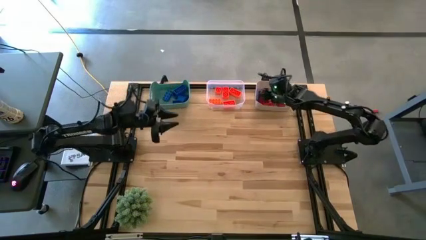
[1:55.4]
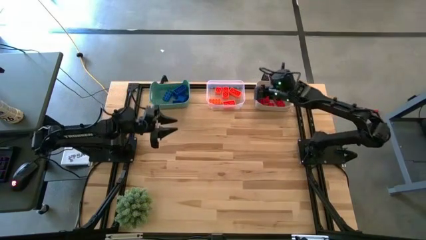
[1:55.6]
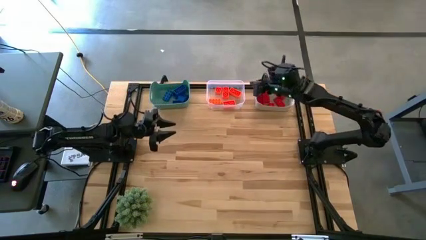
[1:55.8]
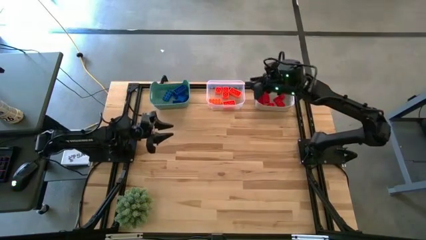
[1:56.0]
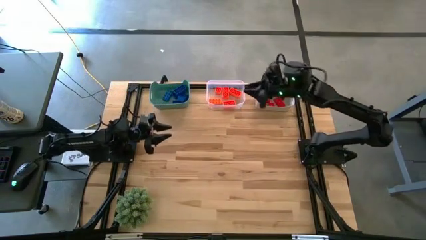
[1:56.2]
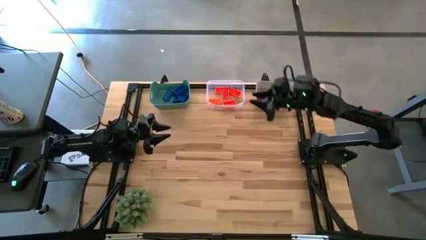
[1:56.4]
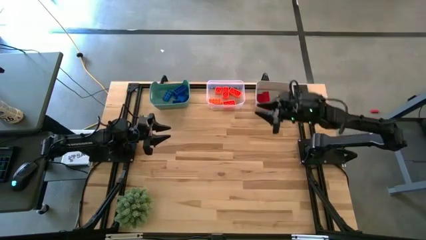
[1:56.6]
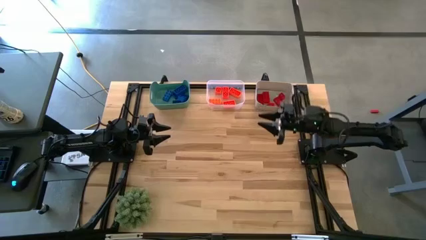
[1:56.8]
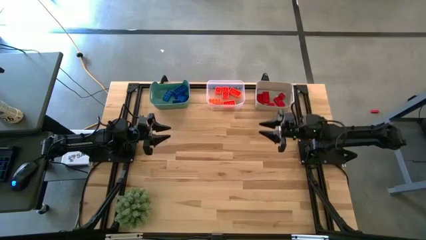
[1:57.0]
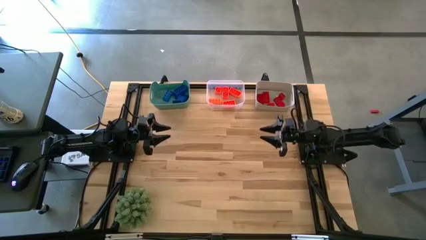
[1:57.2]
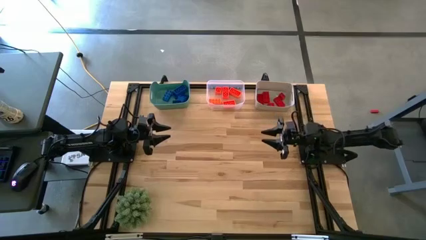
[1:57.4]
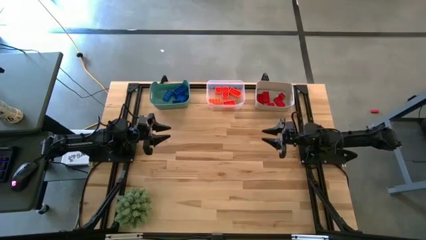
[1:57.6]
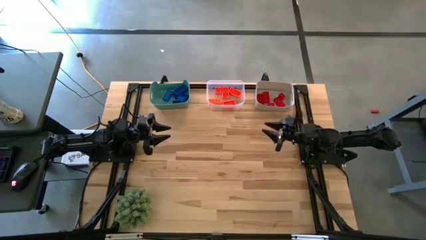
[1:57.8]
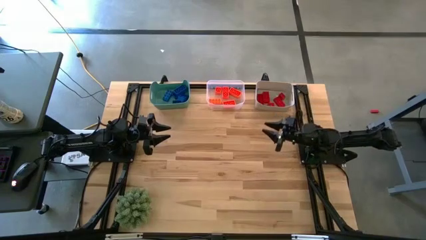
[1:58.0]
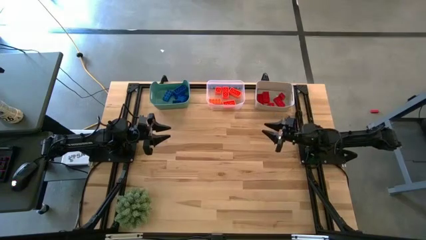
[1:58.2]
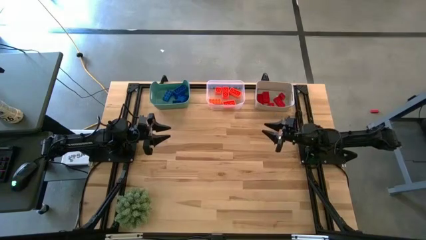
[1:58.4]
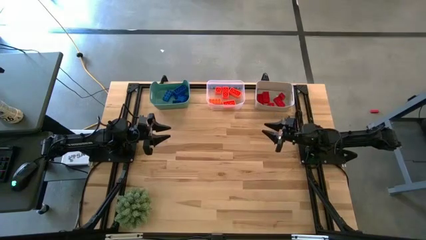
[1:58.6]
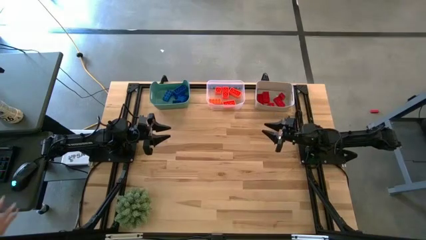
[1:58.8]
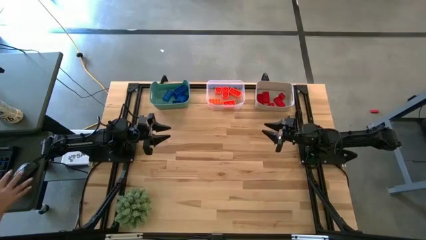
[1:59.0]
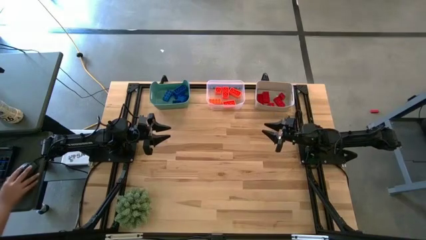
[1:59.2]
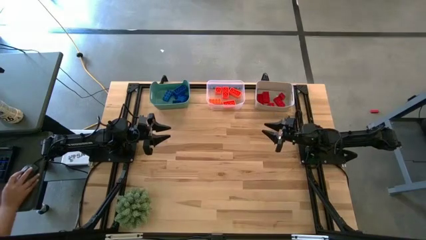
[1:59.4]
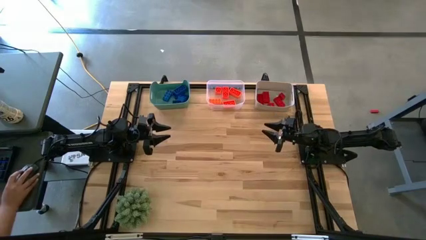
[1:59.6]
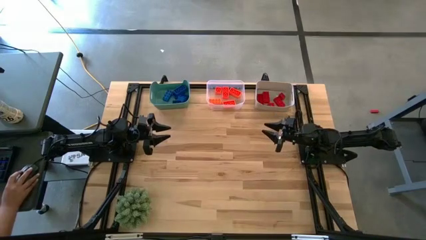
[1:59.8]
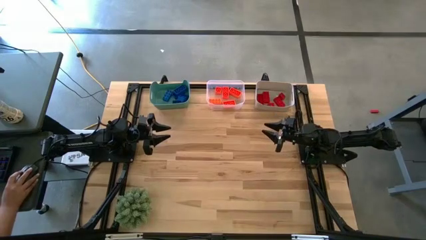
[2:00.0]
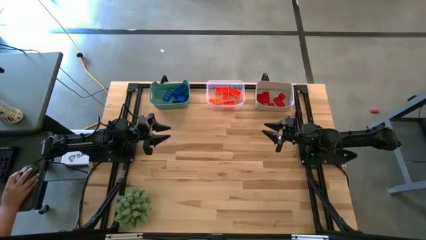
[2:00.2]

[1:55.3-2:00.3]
Task: Sort & place blocks by color
Return to Home Position

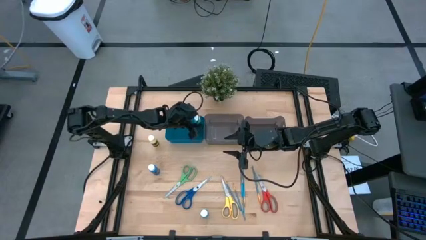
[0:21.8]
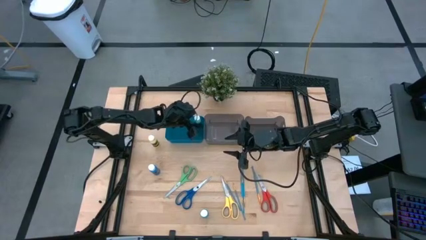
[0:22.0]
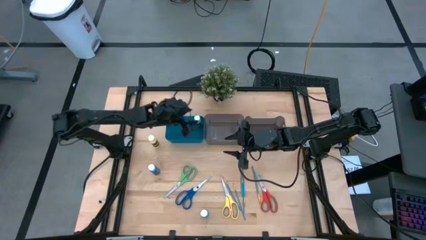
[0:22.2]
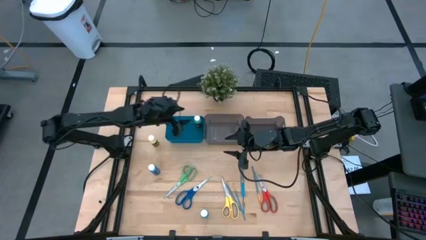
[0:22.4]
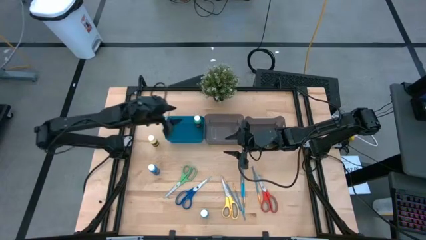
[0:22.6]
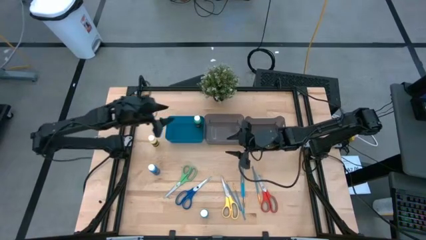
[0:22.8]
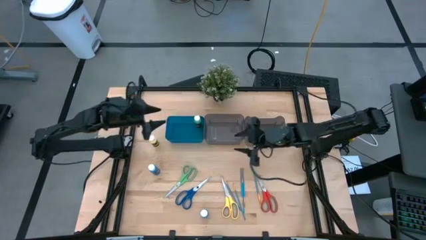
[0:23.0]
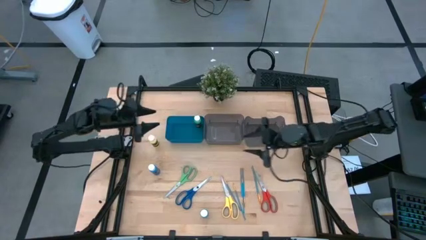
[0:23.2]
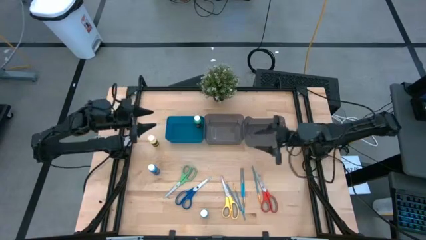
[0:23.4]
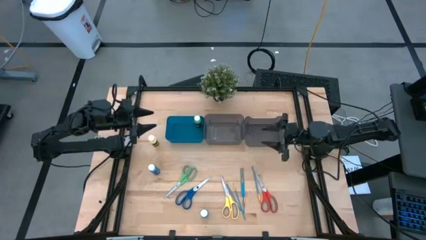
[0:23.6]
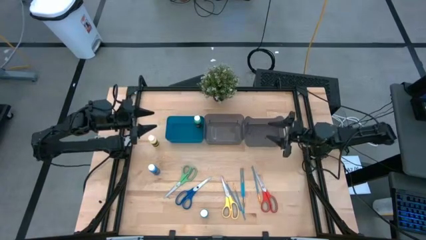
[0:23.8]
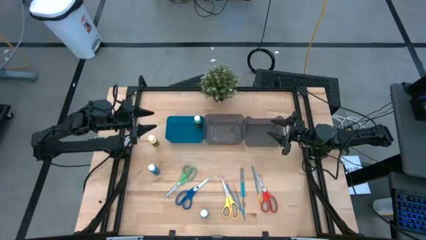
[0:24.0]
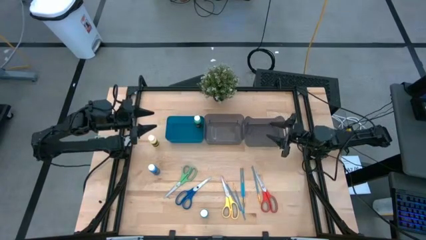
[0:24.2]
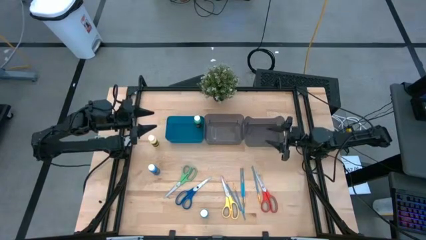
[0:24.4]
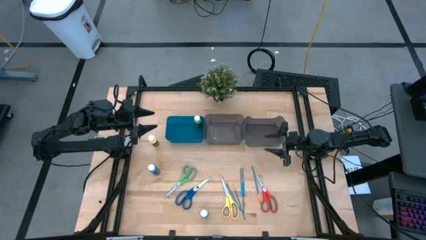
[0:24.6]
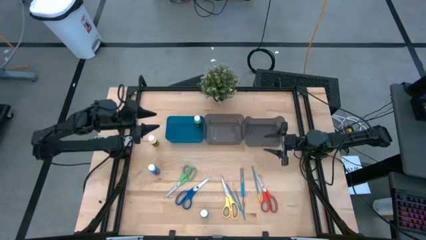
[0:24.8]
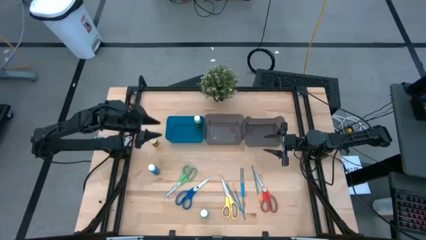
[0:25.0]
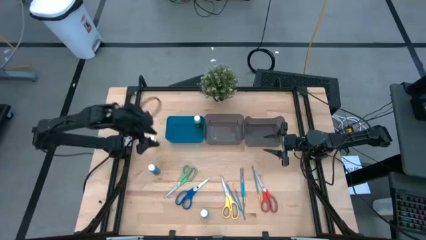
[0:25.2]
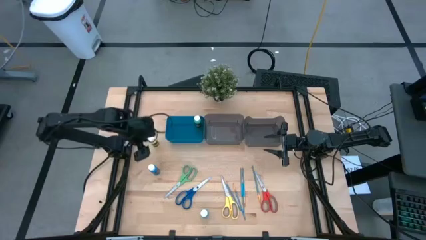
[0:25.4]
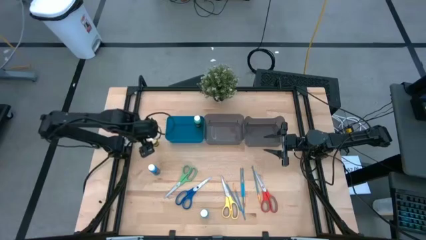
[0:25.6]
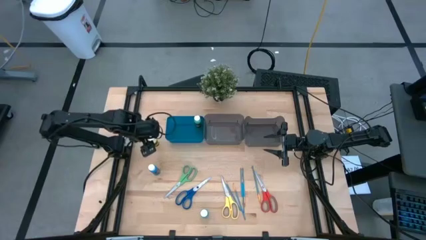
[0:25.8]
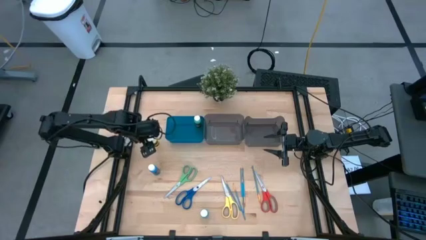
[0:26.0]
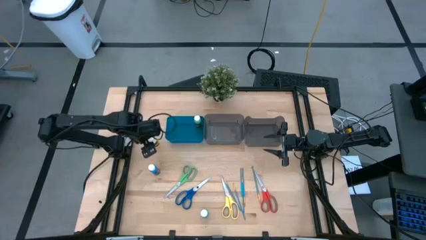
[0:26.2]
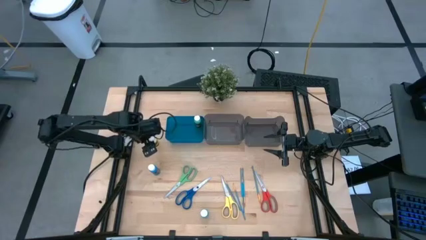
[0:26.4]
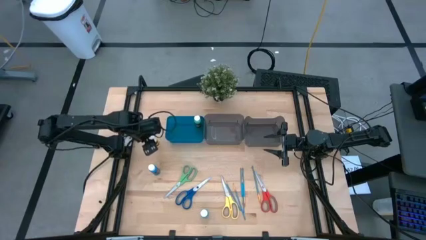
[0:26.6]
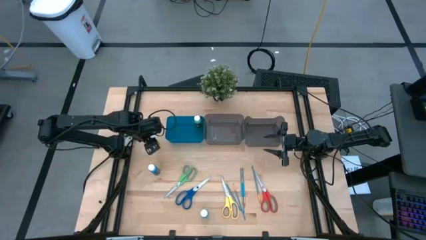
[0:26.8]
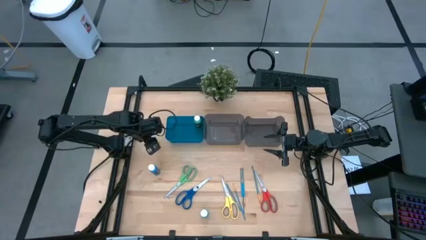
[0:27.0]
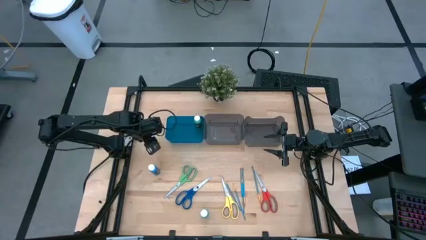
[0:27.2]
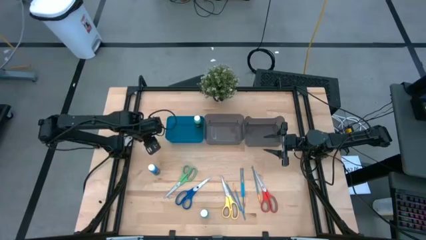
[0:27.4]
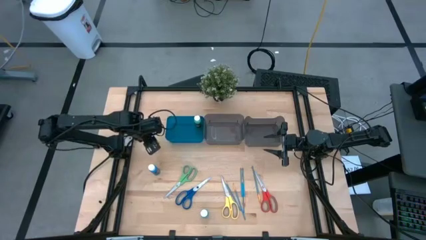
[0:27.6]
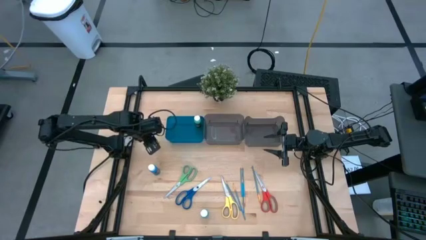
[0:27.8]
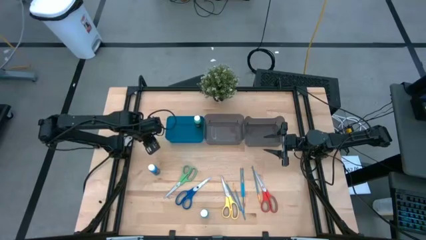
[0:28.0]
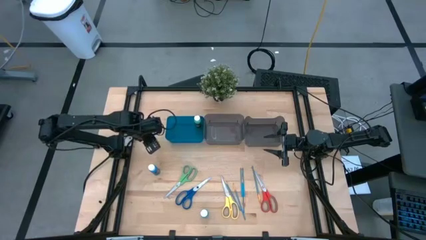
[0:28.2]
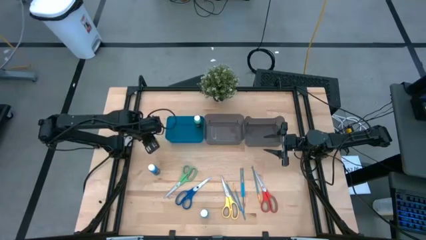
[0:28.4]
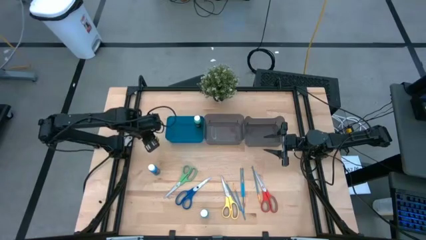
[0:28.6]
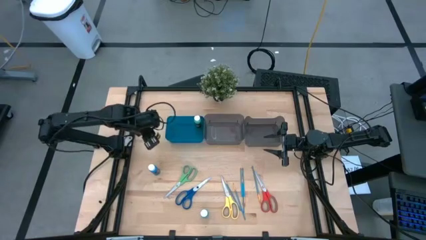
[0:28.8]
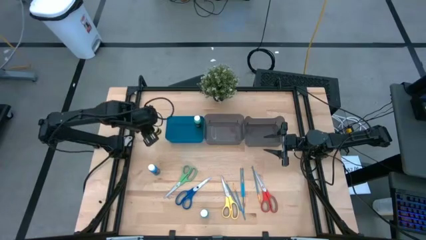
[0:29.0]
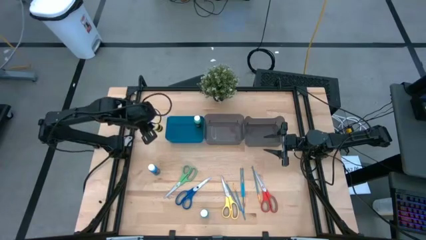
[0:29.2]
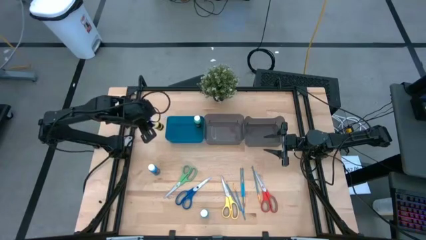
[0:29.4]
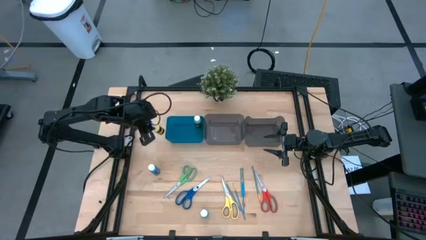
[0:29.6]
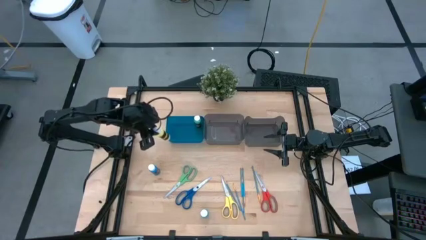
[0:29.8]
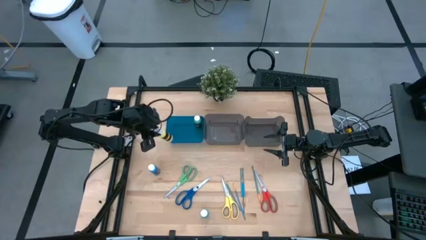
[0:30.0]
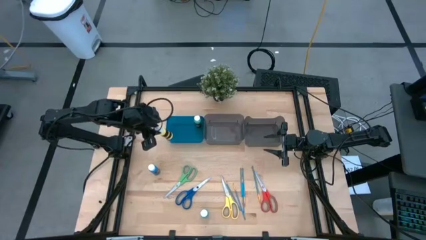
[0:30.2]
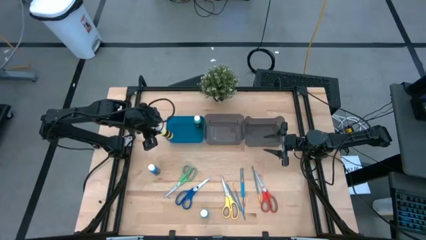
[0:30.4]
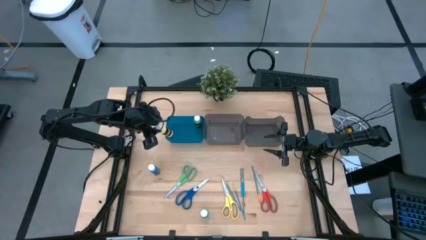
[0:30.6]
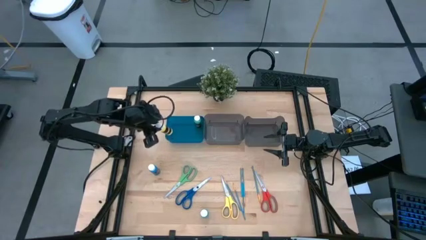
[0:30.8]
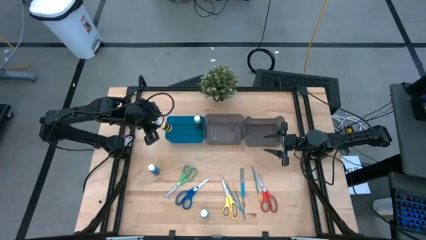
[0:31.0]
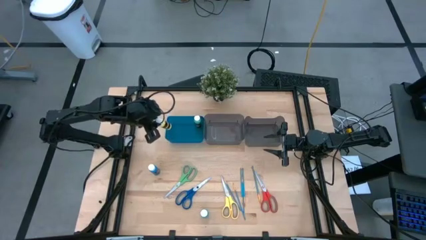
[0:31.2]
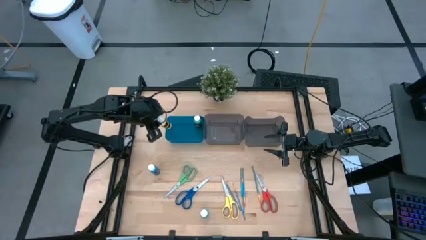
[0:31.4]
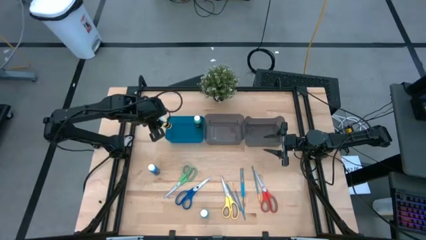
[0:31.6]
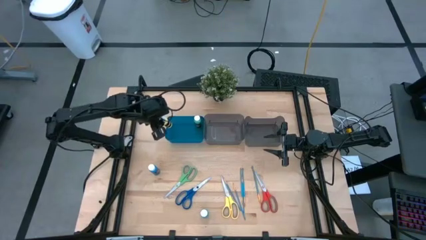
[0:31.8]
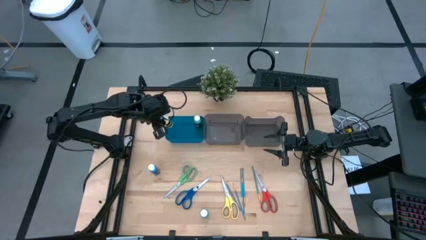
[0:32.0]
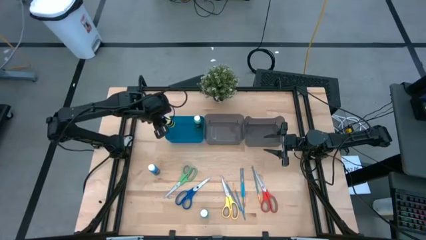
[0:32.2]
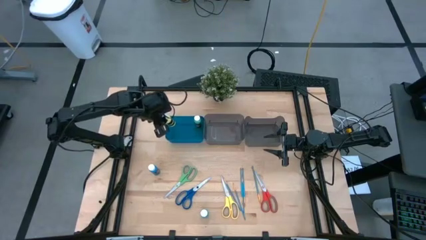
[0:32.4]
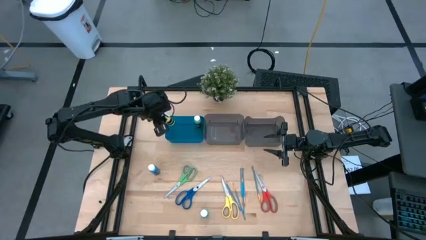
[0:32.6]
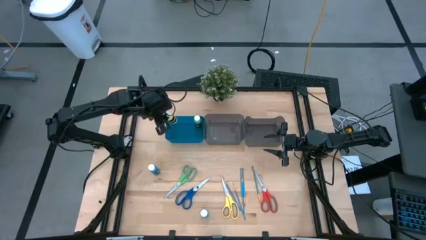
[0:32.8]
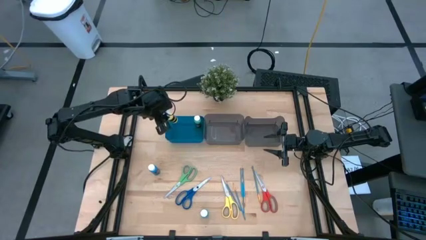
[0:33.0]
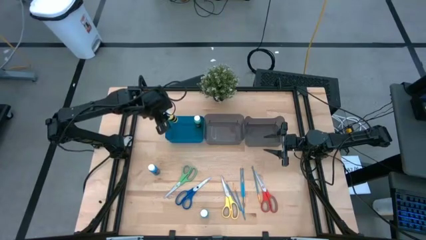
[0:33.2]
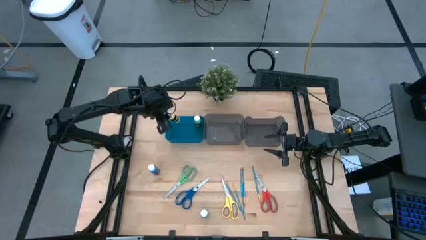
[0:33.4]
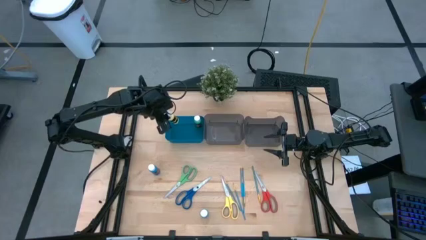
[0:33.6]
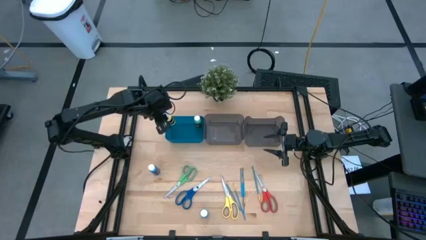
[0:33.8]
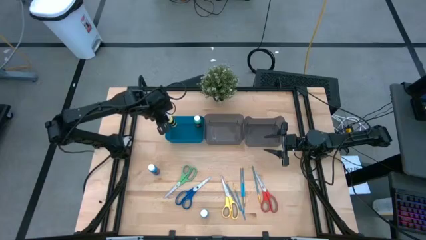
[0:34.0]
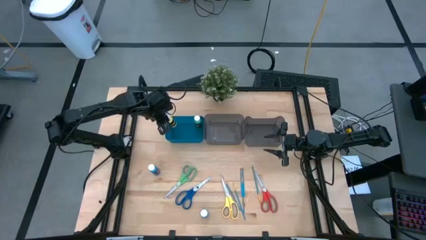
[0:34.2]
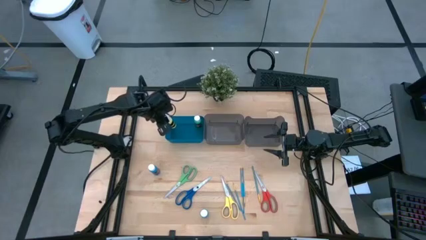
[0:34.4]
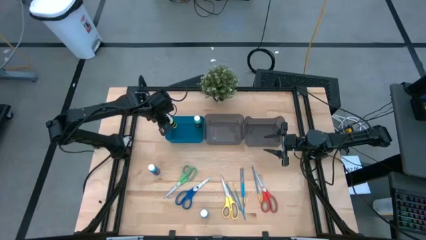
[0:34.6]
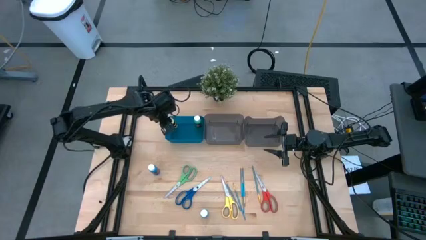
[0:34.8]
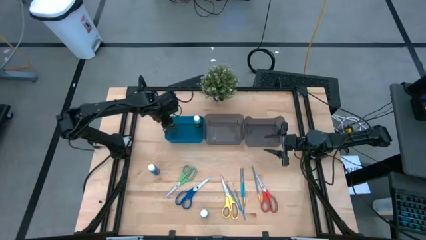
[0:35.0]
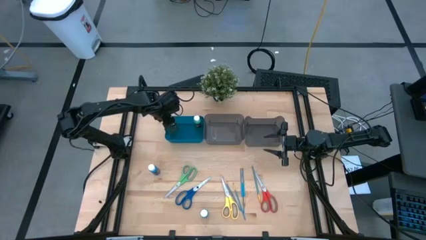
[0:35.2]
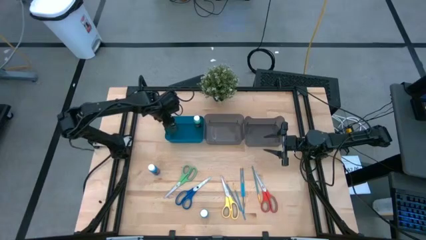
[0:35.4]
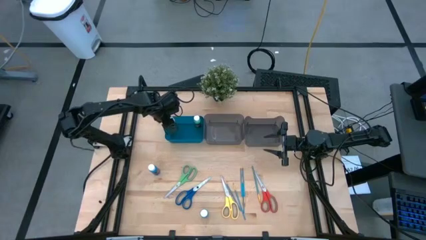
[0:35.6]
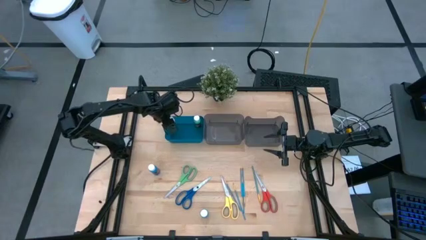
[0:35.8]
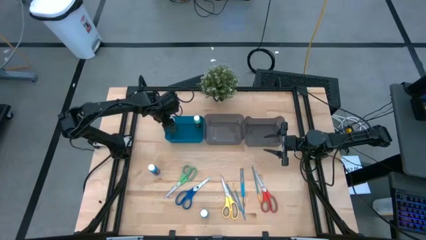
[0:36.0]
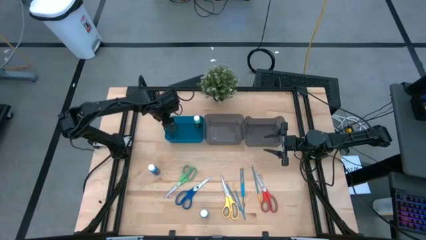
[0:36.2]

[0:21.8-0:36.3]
Task: Pick & Place Paint Supplies
Put the yellow paint bottle into the blue bin
